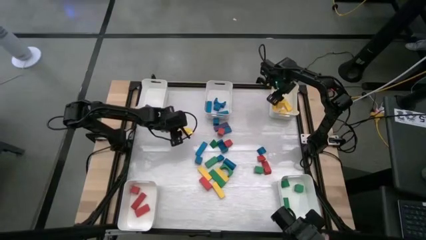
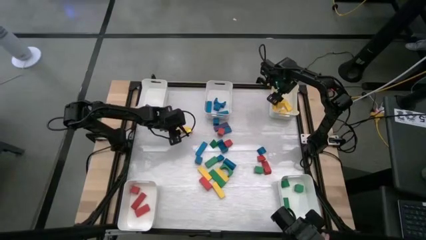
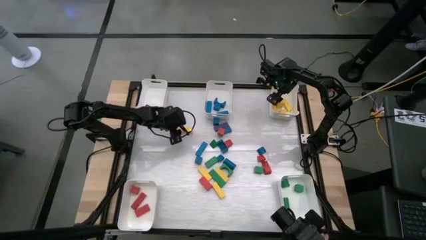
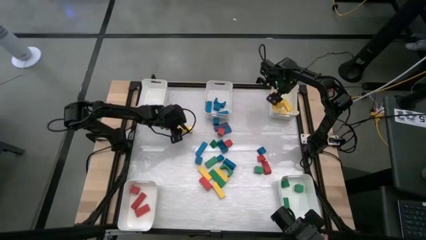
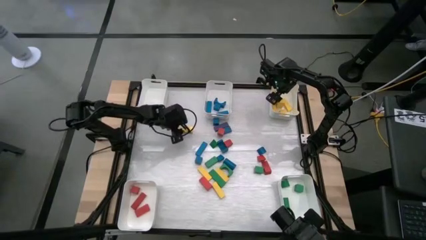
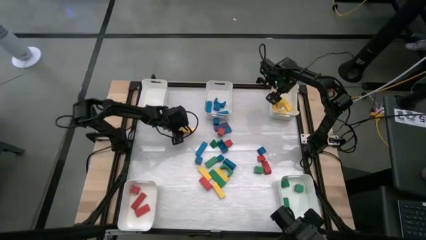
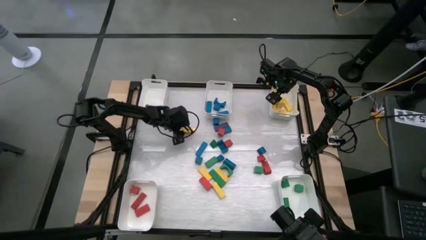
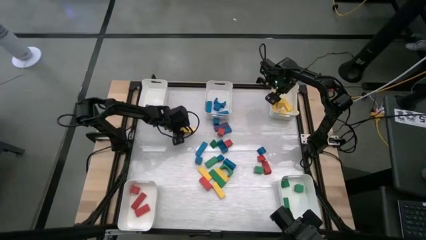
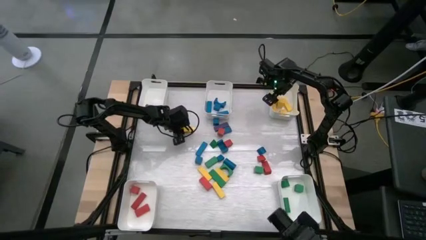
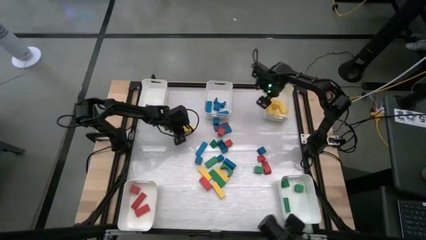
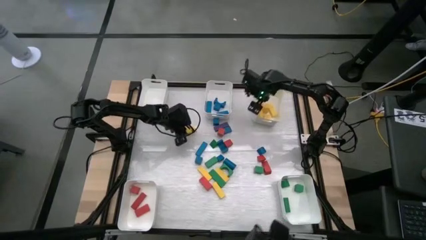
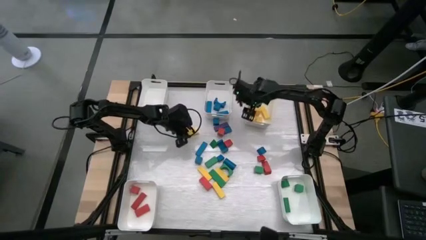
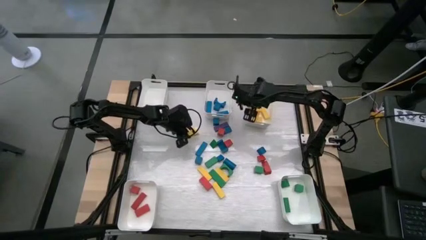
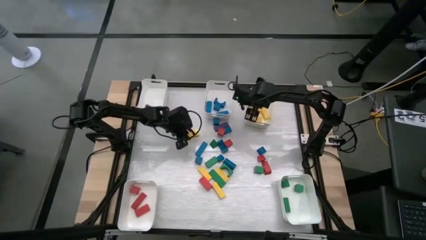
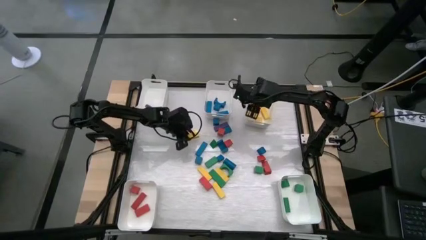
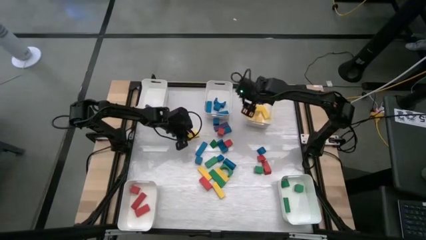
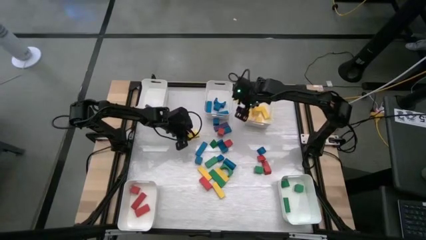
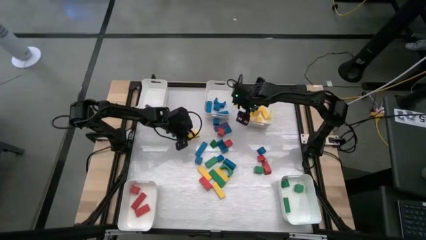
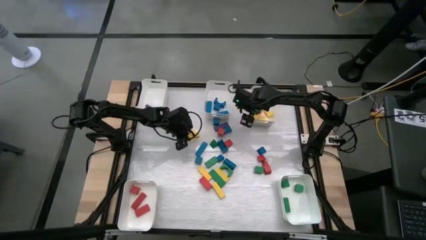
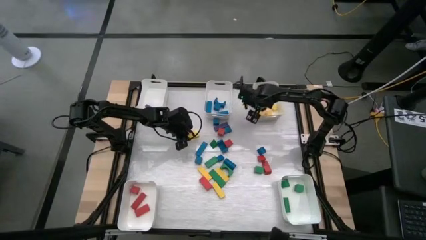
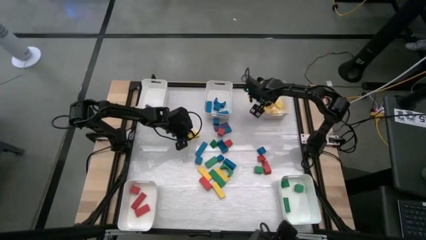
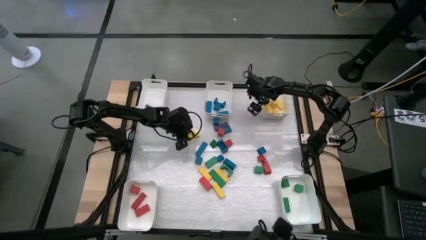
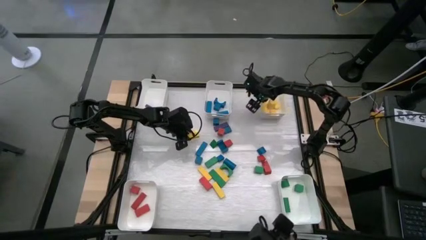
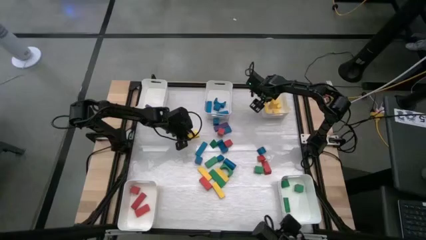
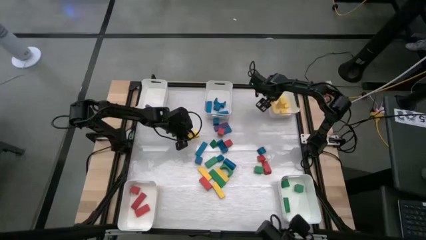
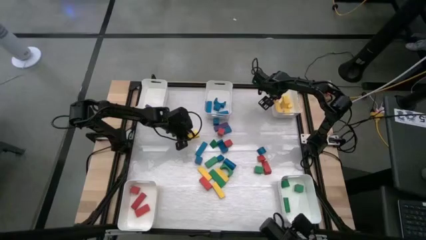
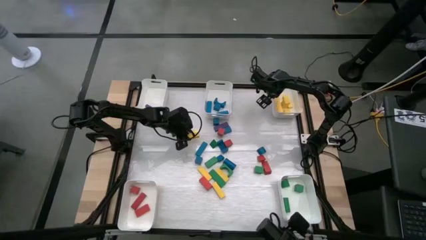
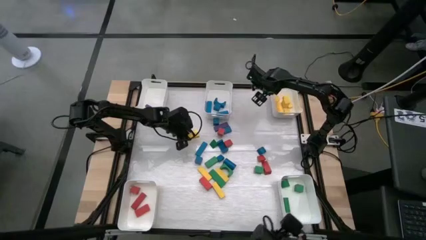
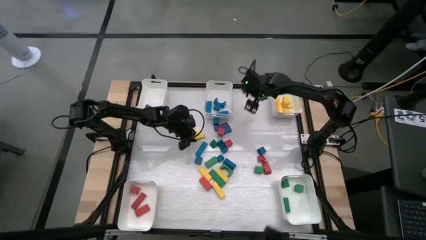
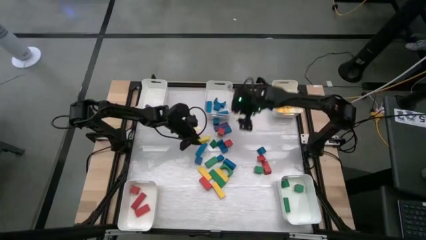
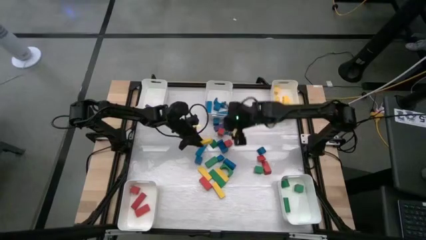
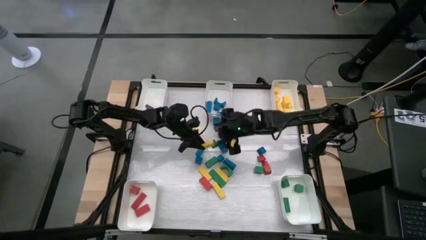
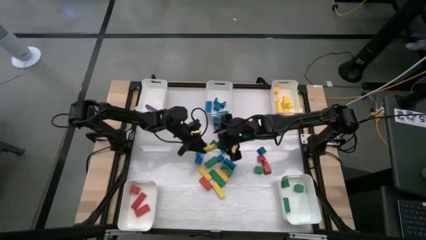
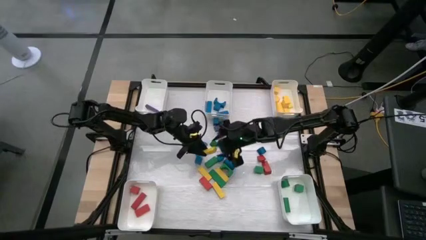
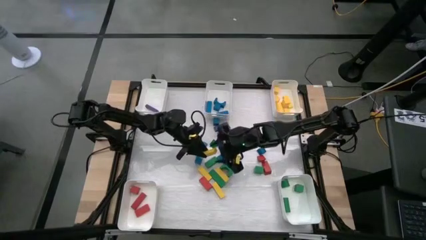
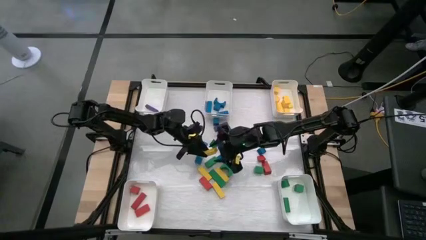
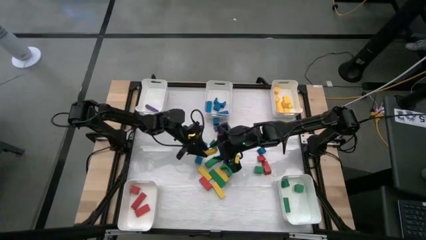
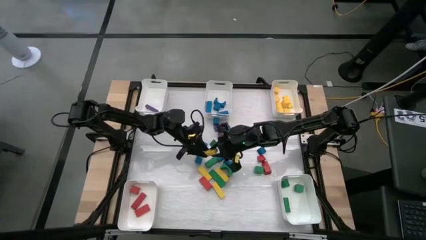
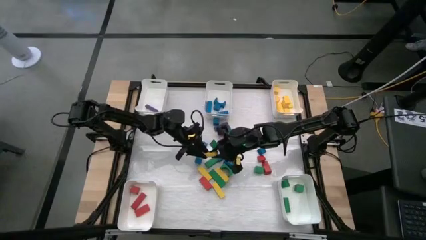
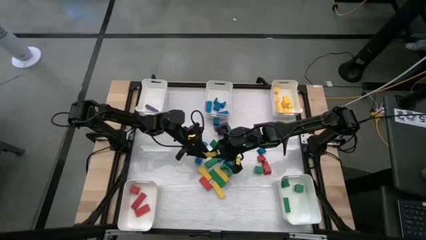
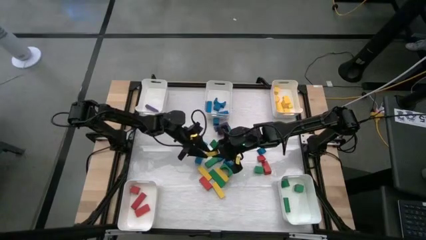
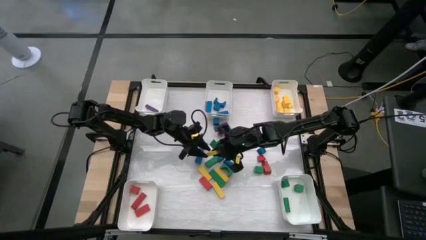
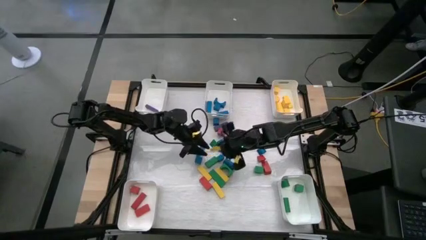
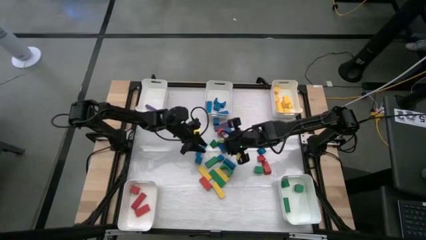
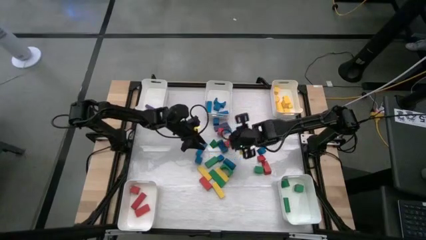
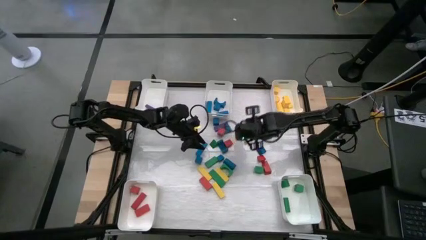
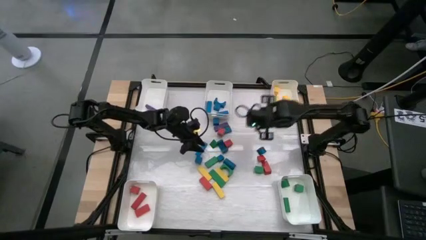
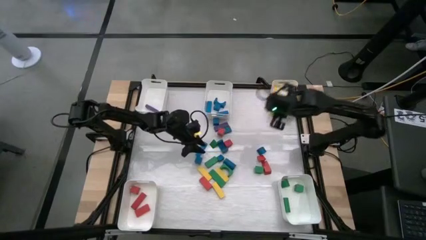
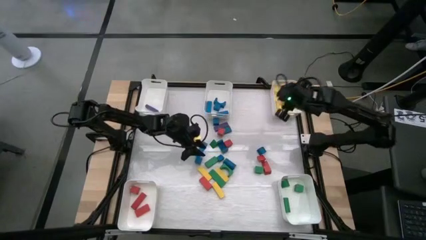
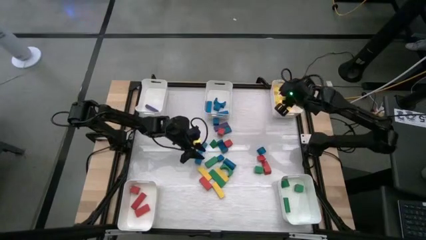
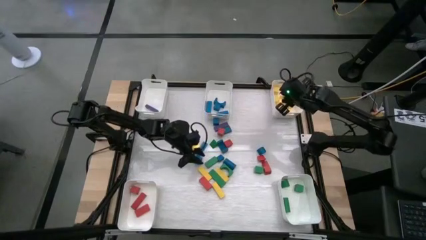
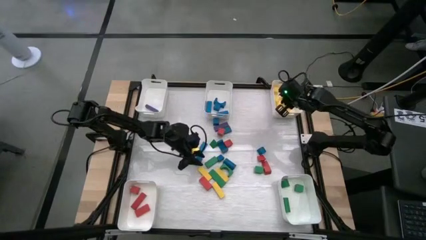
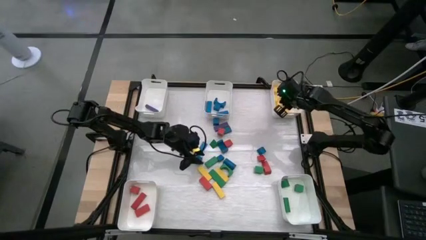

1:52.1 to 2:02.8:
Task: Sort blocks
Put the yellow block into the top right white bin

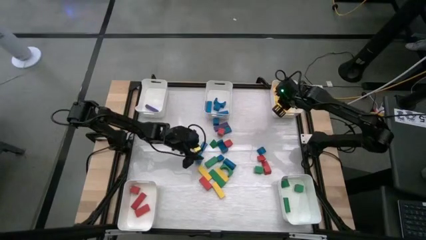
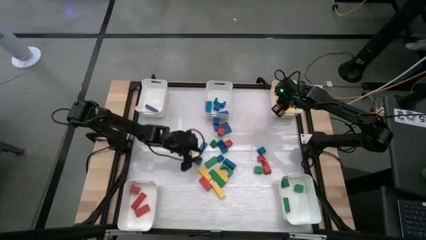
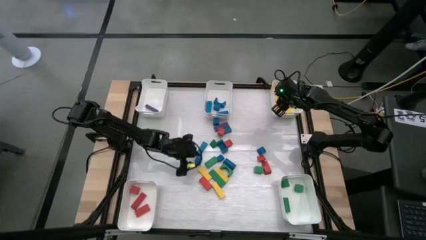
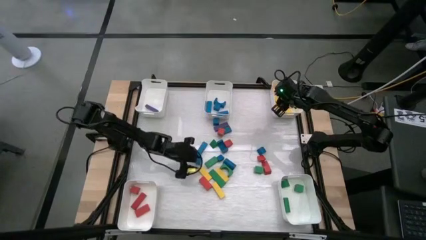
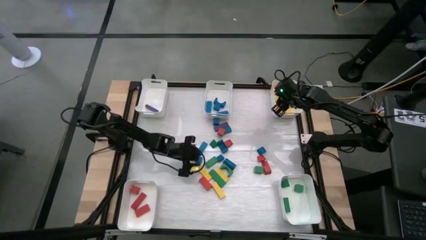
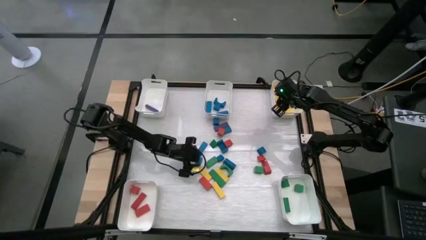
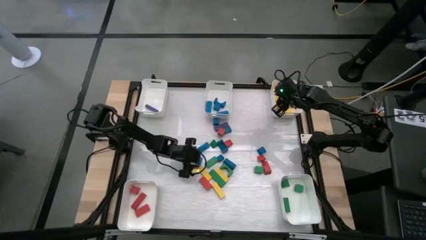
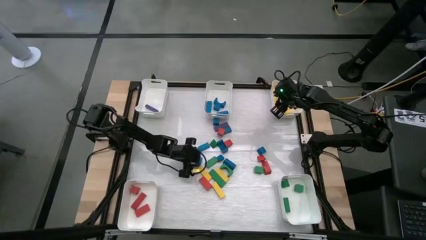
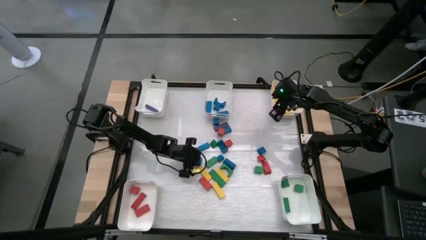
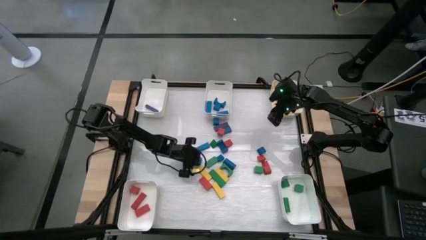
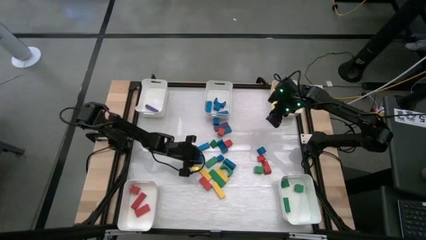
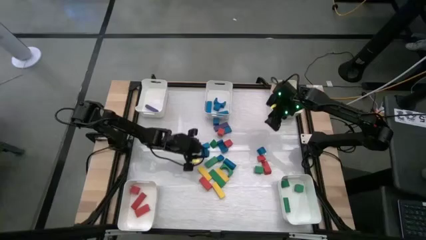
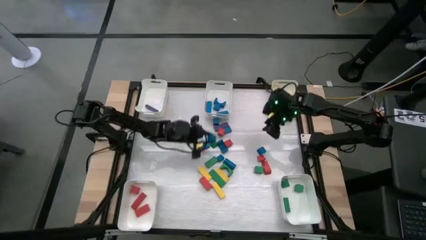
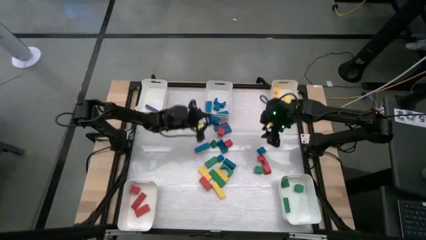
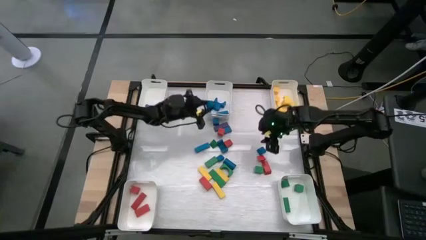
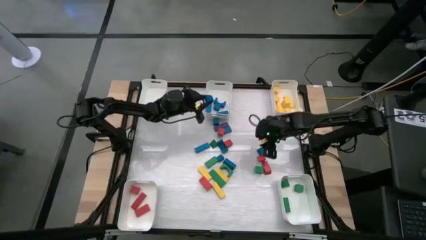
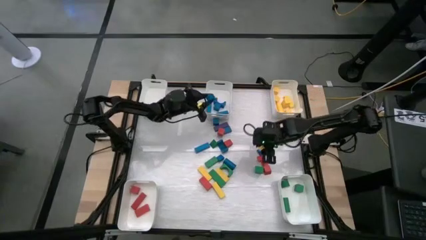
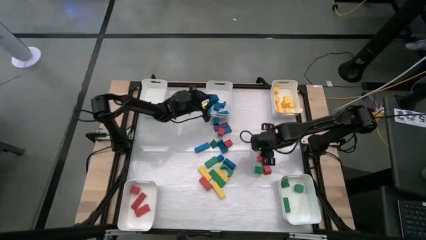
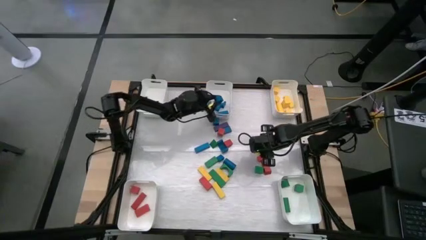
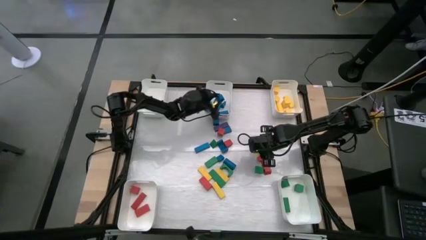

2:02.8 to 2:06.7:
Put the blue block into the top center white bin

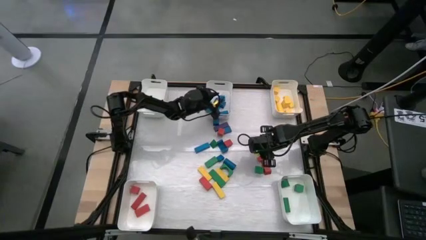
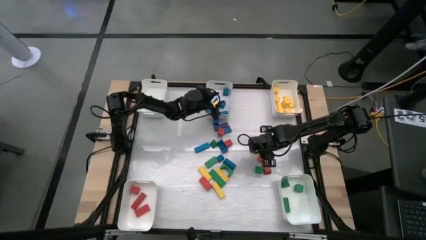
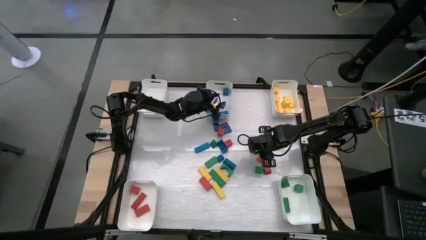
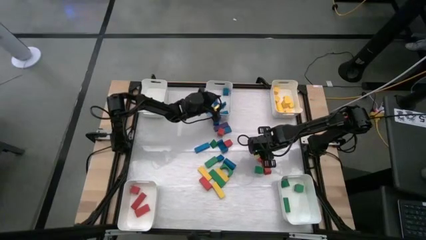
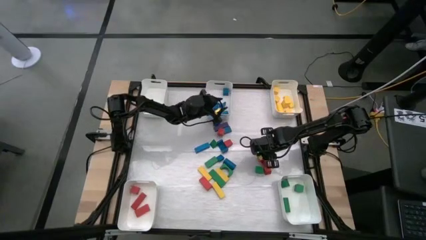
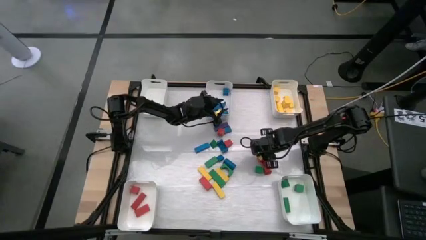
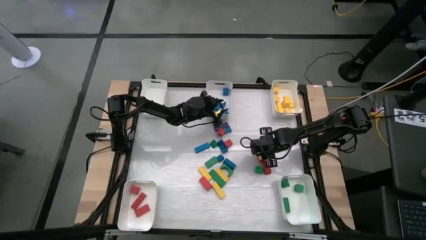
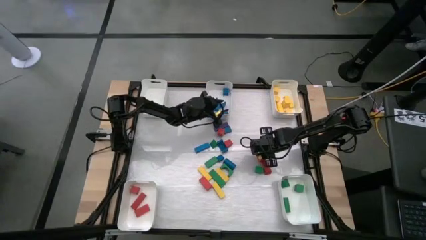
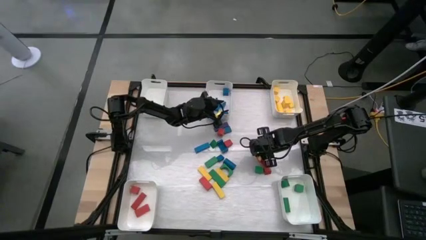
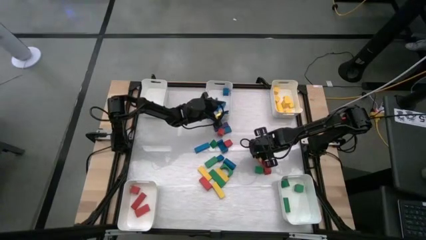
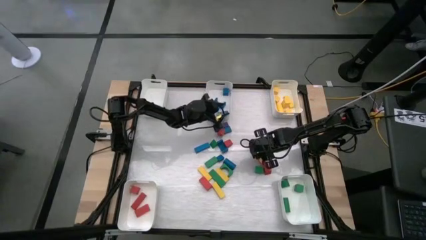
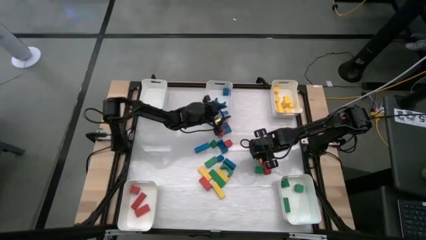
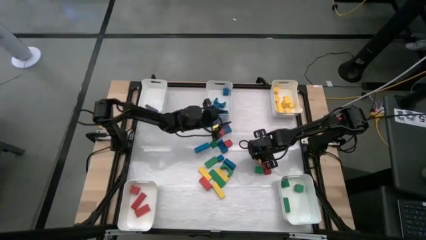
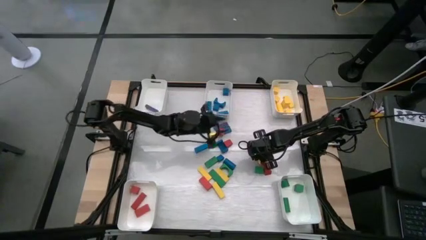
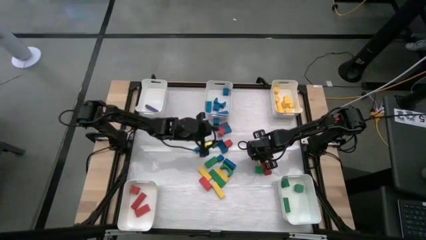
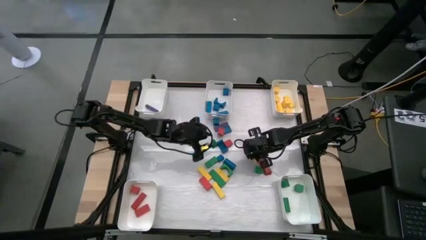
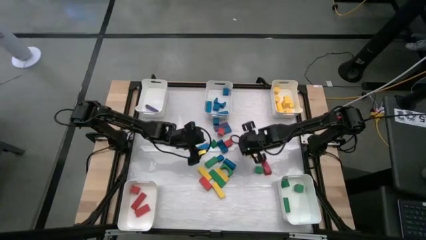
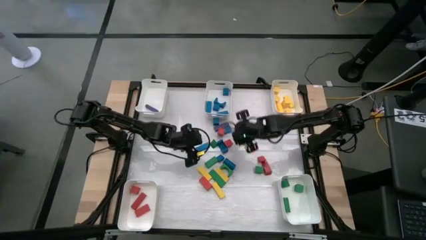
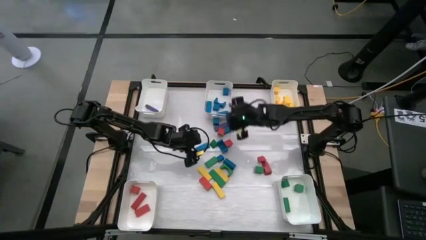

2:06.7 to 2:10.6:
Put the blue block into the top center white bin
